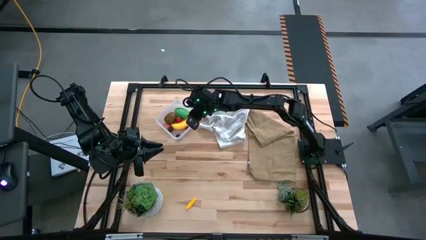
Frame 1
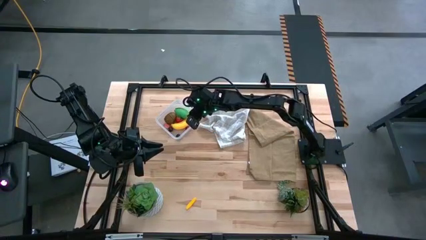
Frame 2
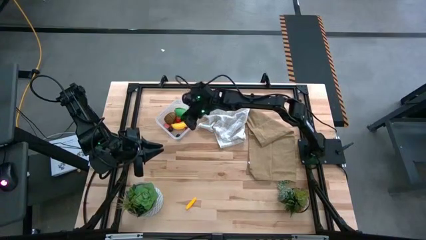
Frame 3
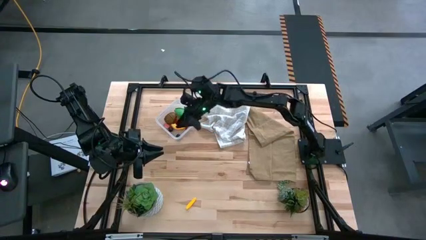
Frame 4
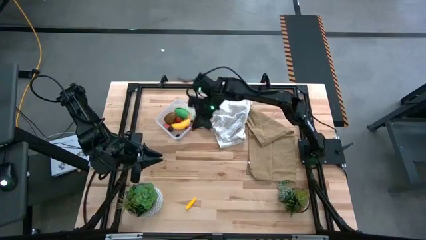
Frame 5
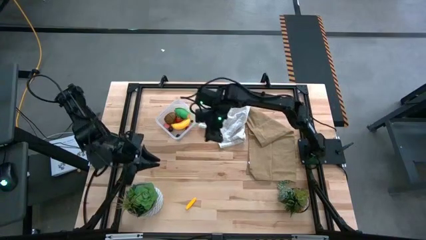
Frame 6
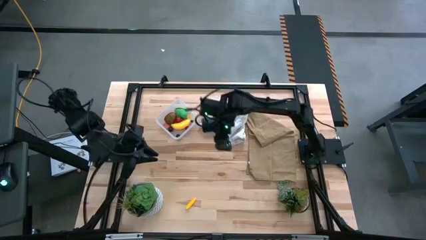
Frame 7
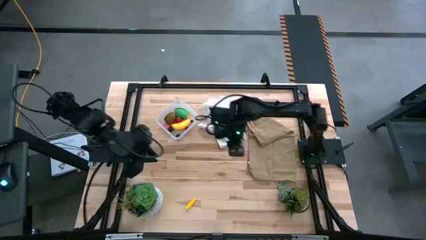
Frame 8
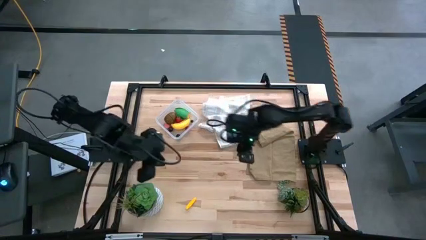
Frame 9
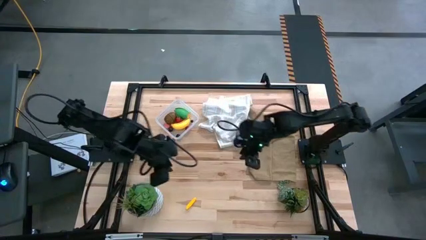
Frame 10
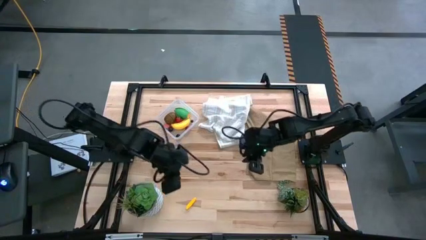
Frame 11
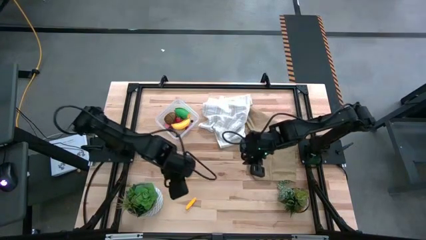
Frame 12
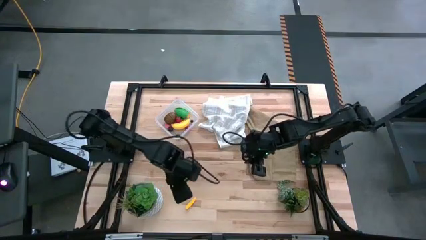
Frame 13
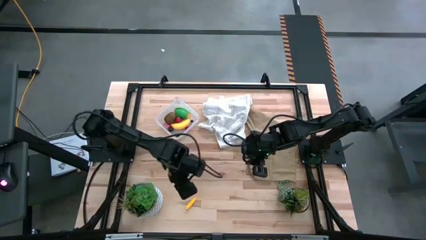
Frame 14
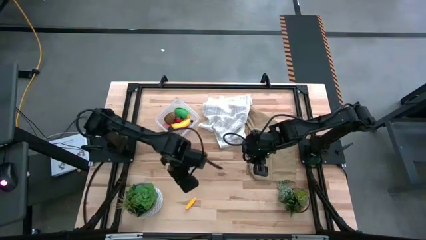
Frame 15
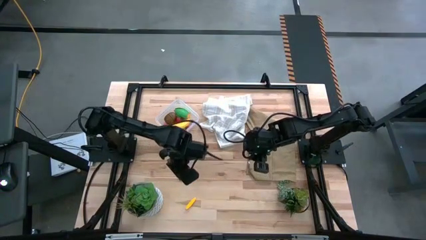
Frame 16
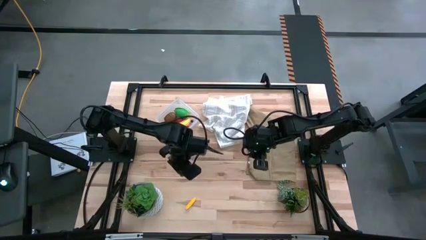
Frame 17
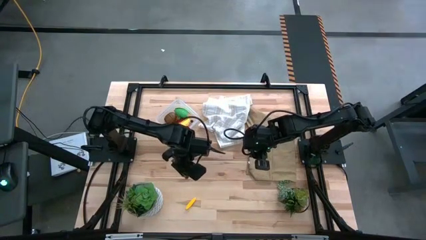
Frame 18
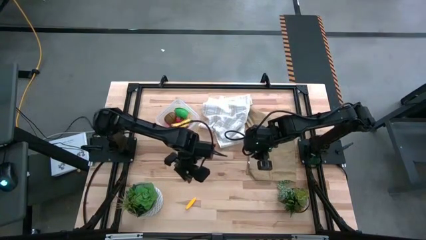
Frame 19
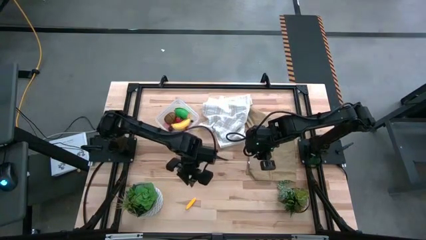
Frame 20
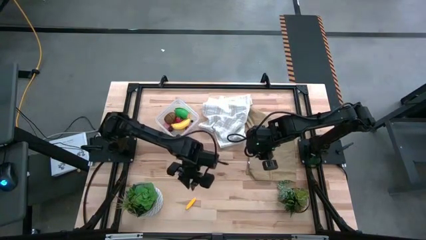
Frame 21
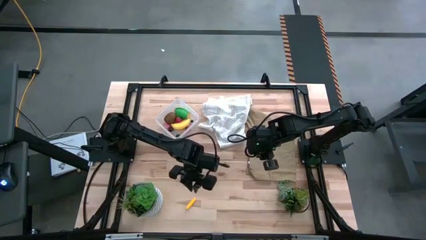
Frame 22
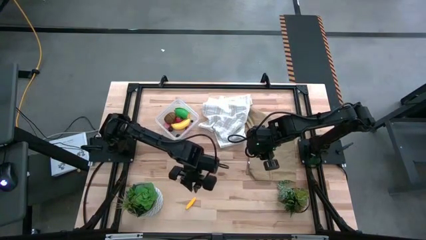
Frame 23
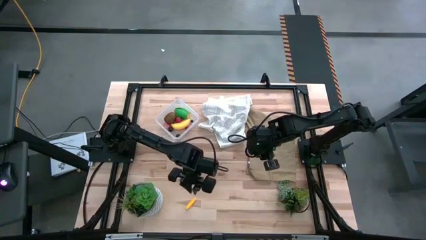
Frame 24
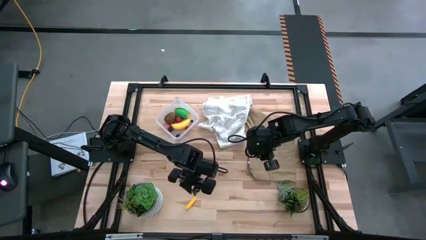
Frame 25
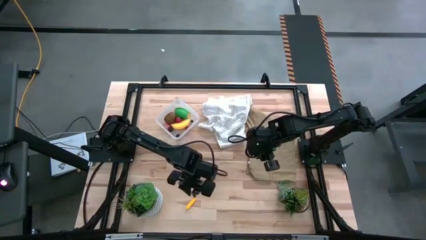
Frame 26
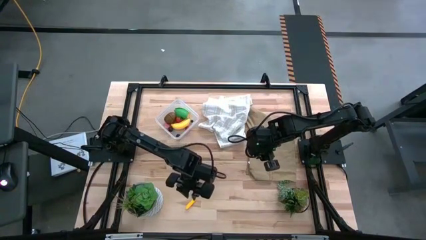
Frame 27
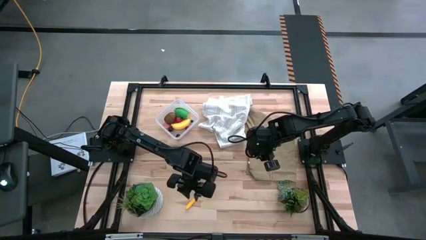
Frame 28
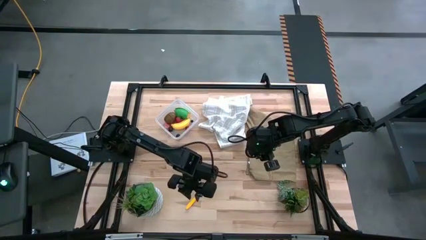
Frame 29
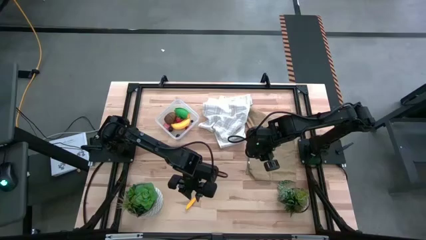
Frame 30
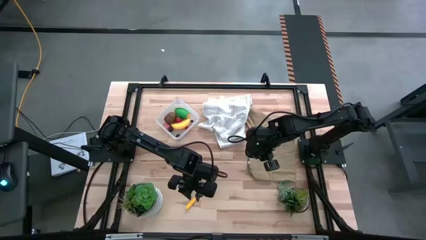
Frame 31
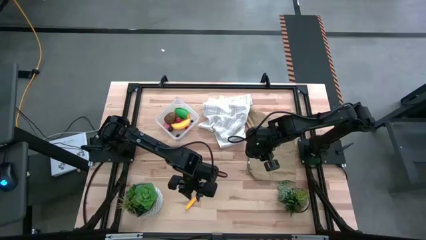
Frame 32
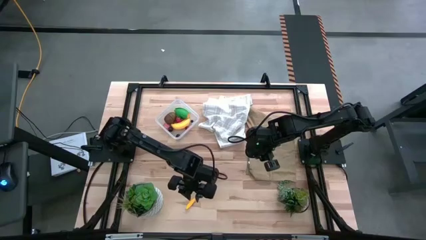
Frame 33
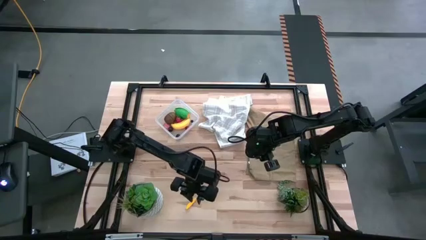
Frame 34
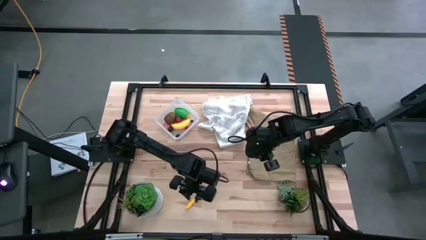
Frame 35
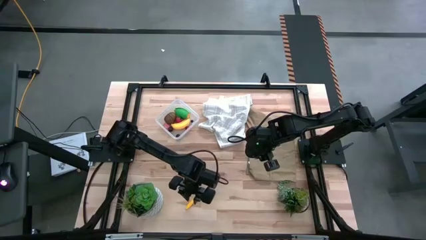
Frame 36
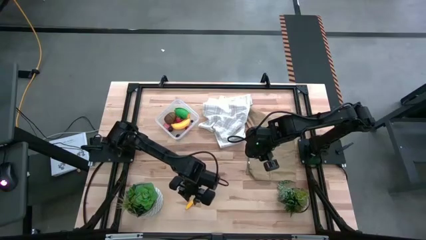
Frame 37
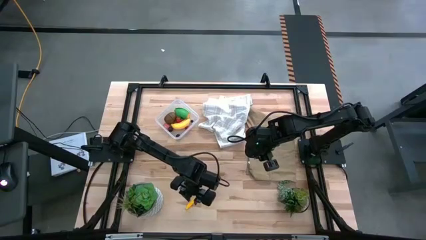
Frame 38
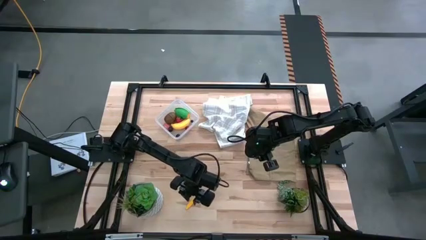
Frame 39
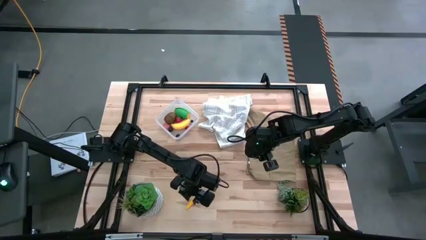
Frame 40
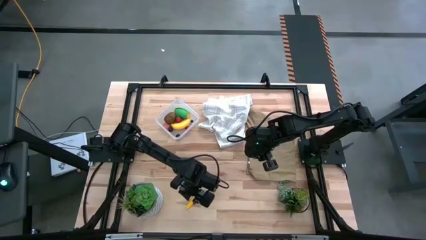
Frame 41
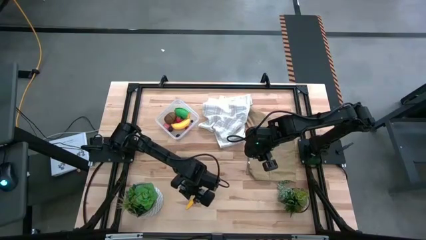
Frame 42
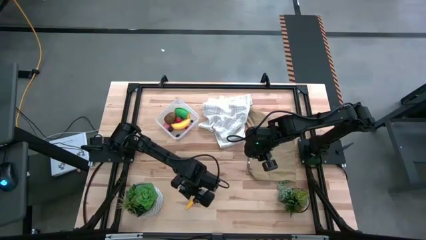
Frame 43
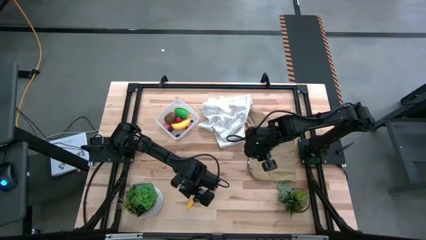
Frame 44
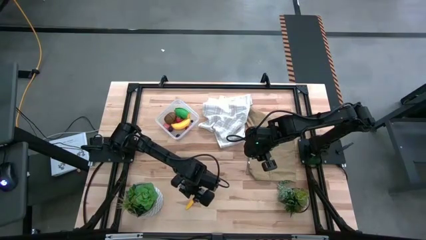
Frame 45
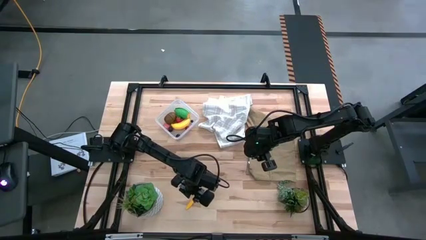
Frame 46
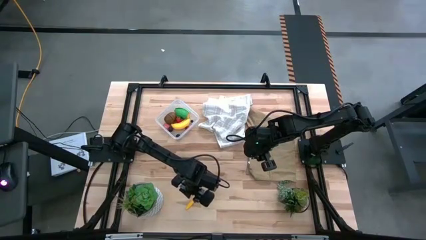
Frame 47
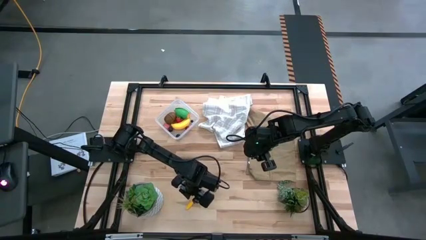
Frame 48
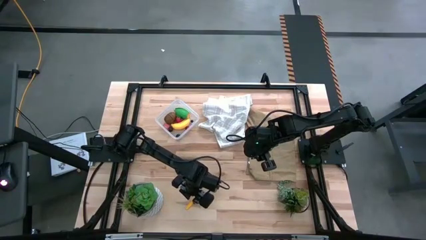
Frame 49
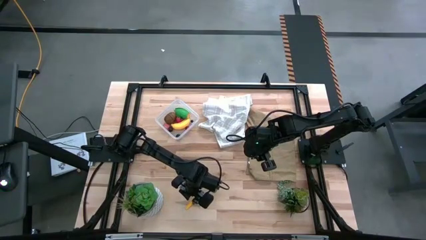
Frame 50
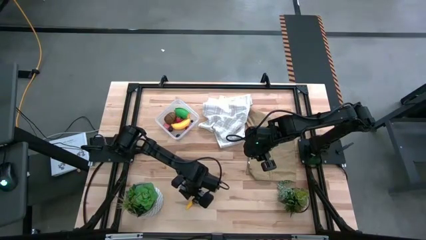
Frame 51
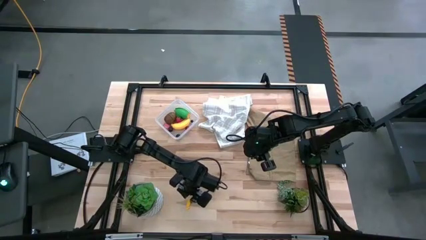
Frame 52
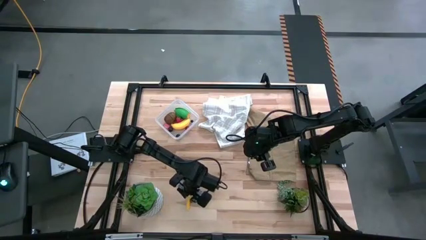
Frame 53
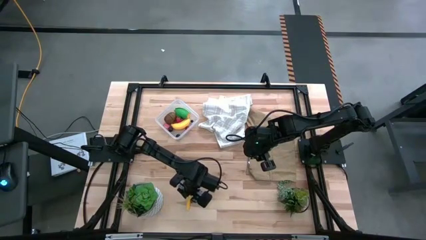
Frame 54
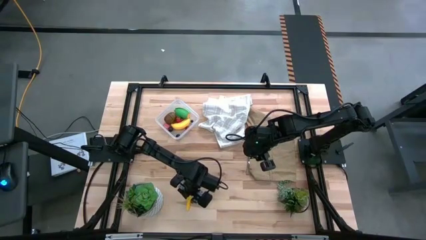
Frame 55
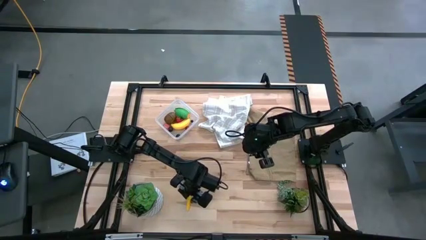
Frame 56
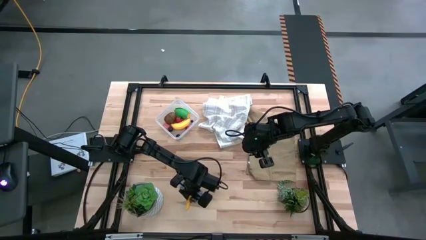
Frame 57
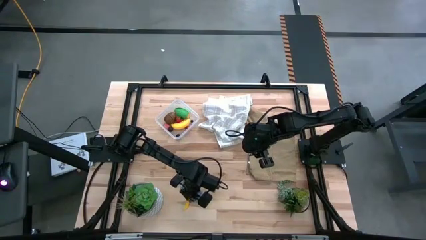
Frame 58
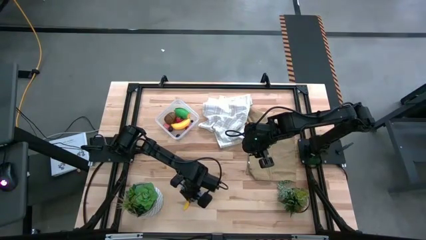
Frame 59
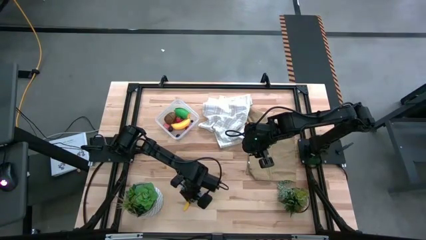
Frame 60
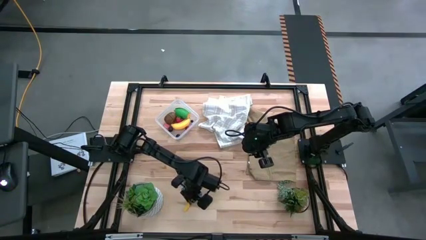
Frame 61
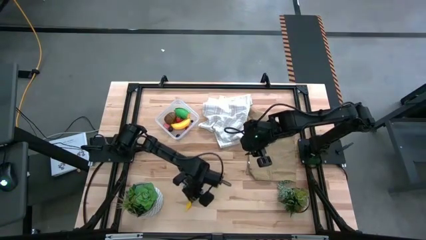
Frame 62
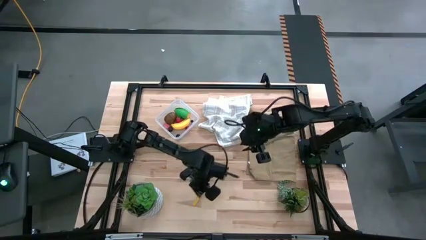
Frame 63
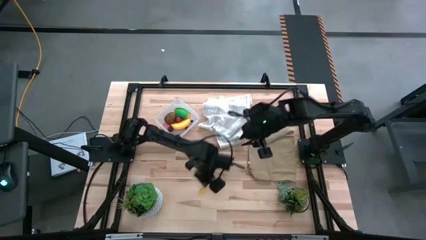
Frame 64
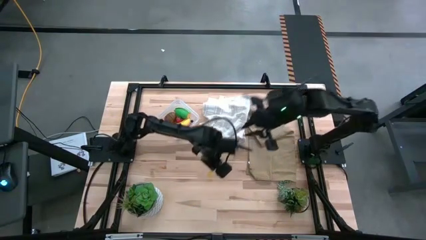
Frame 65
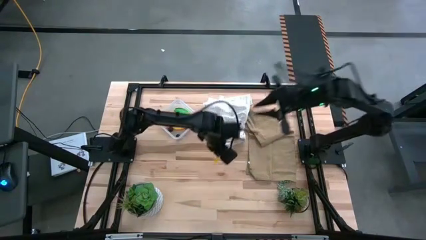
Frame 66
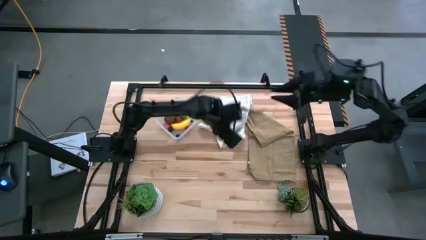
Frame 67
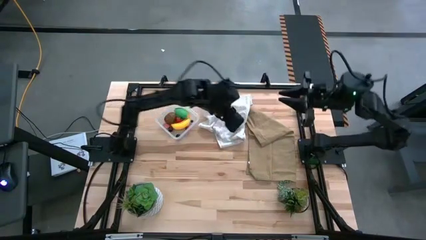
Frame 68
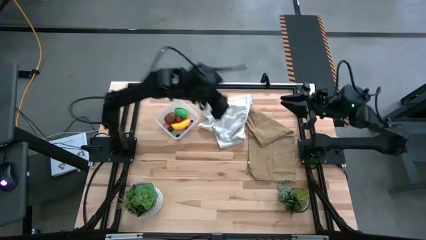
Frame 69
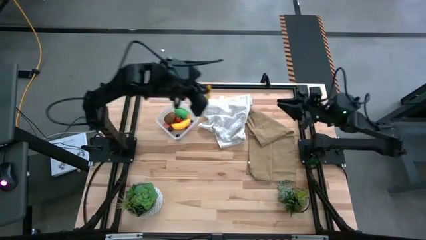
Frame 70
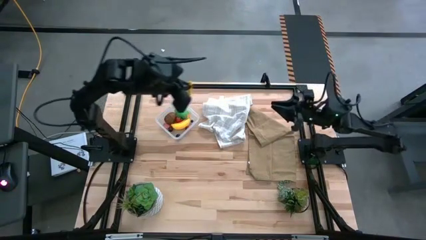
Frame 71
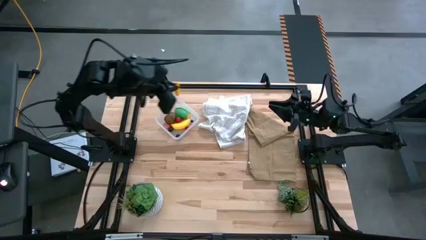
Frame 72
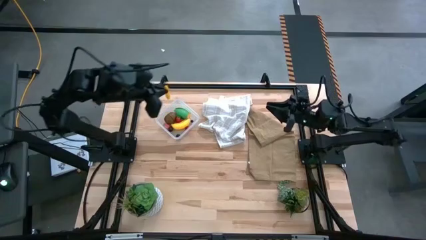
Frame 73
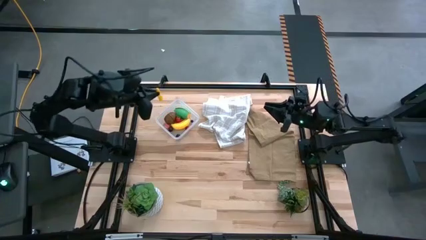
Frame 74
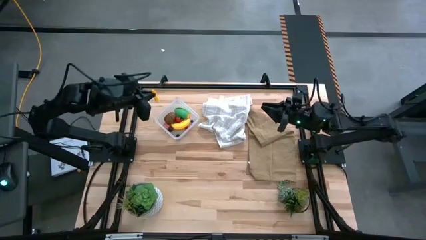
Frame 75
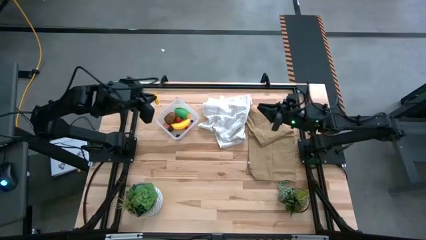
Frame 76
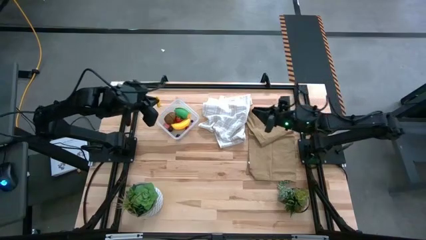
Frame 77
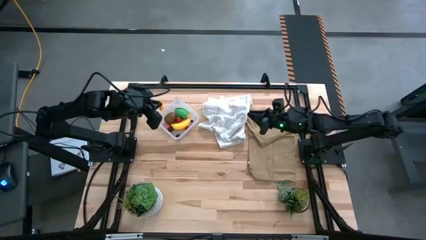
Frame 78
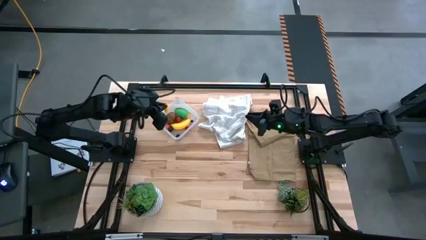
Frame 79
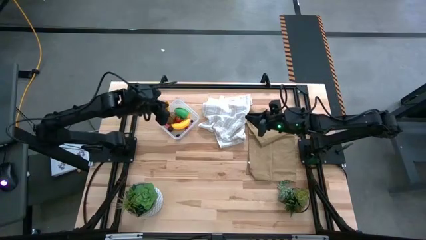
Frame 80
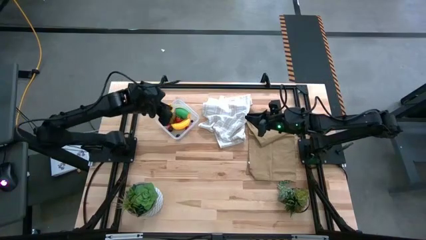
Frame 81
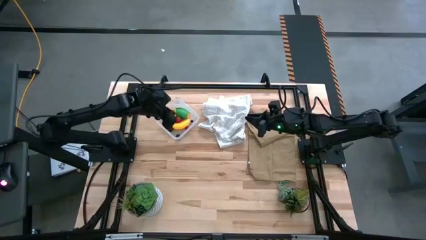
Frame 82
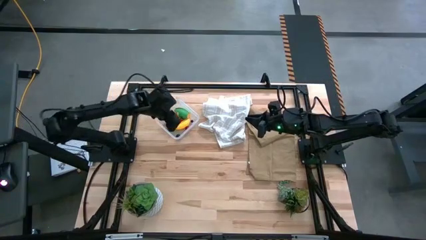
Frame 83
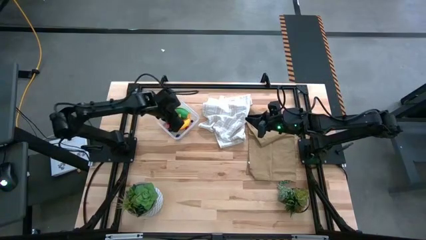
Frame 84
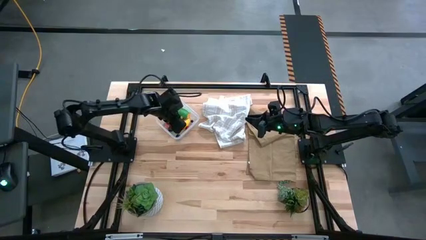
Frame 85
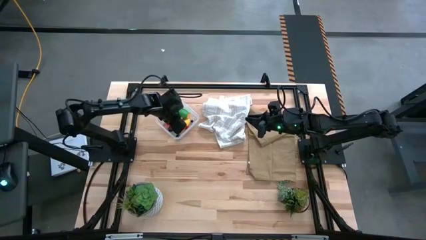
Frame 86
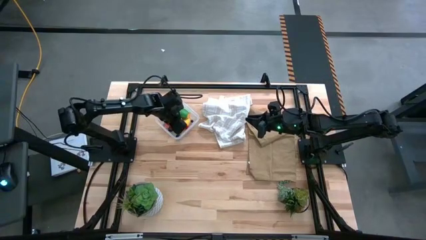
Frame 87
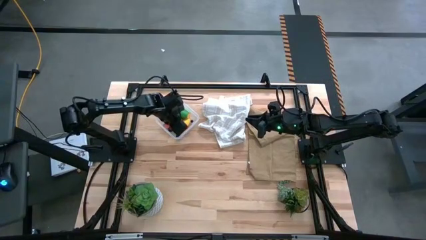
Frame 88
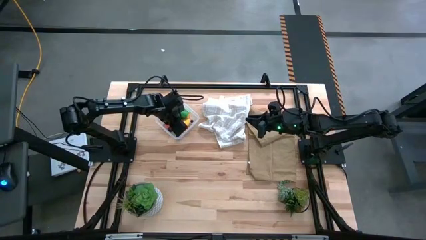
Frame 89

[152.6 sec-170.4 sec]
Task: Pick and placing Produce into tupperware
Put the yellow corn into the transparent bin
